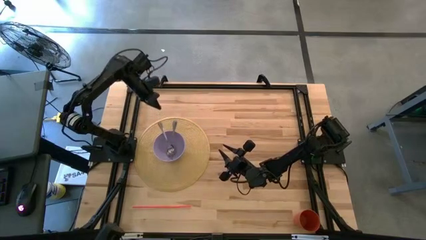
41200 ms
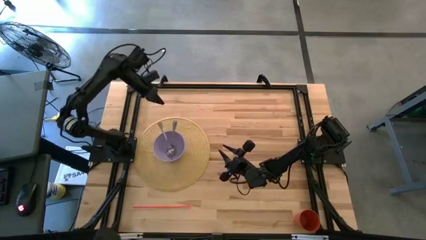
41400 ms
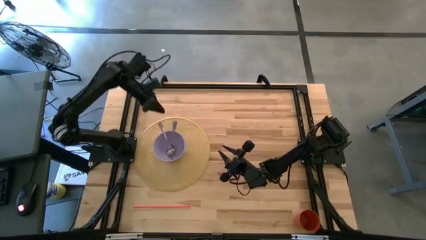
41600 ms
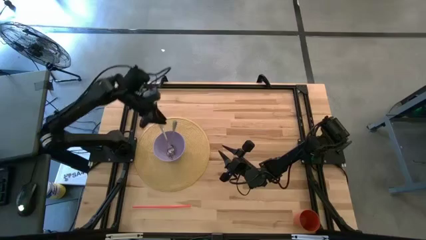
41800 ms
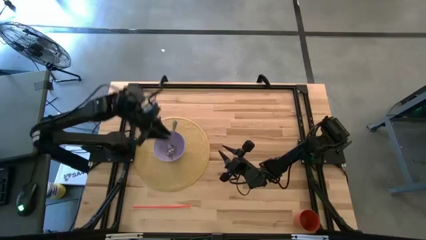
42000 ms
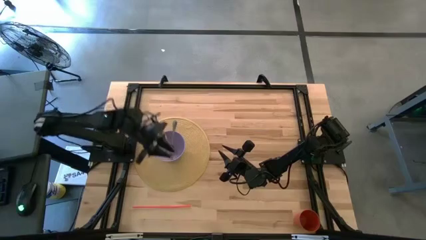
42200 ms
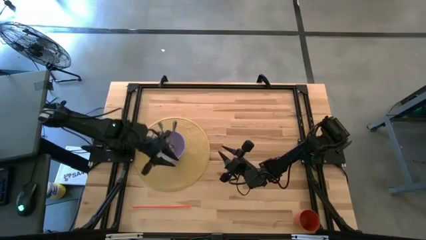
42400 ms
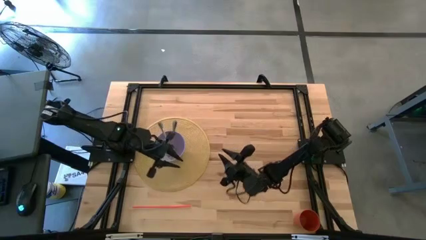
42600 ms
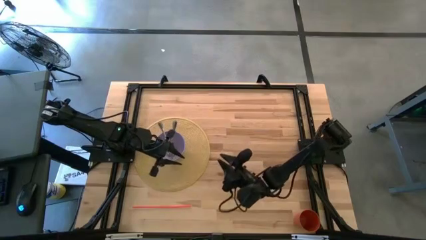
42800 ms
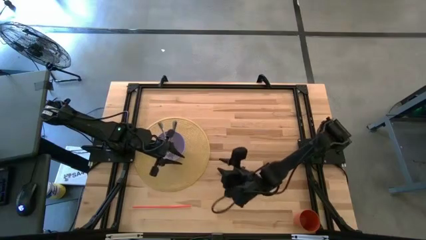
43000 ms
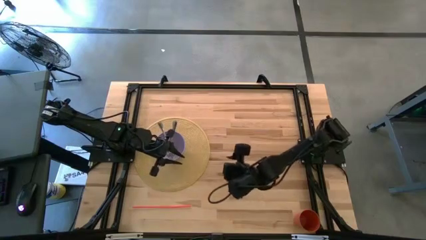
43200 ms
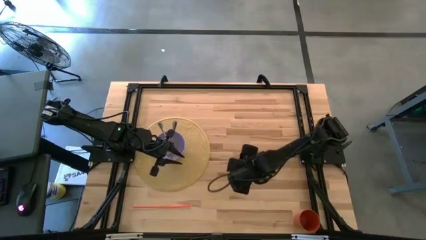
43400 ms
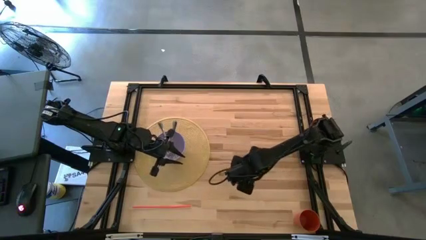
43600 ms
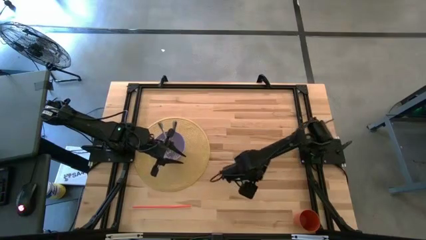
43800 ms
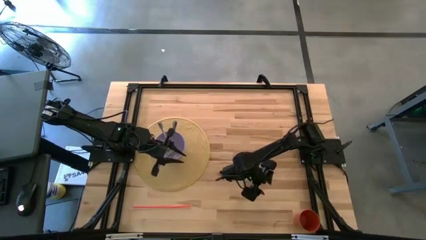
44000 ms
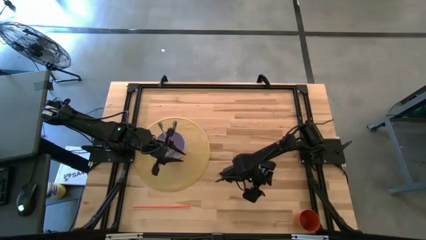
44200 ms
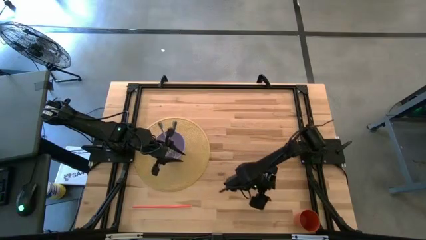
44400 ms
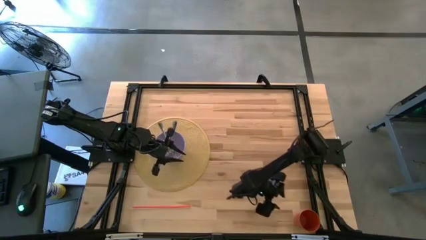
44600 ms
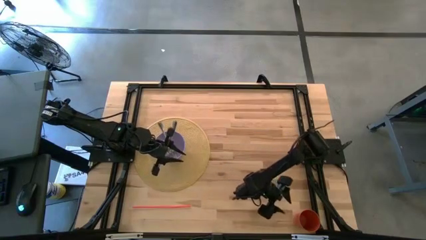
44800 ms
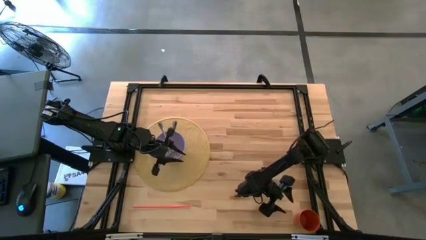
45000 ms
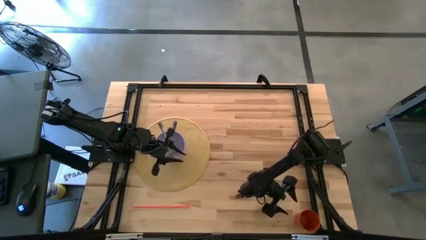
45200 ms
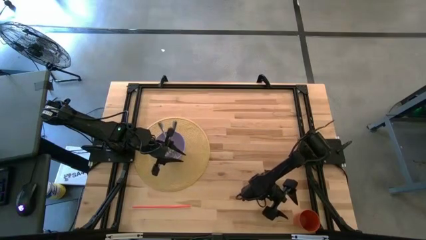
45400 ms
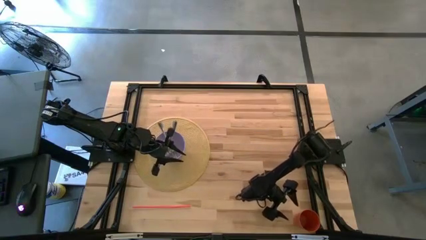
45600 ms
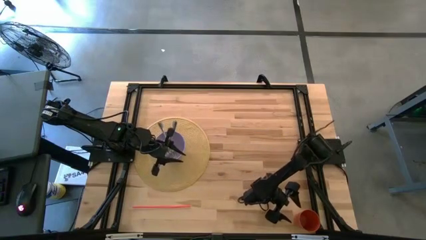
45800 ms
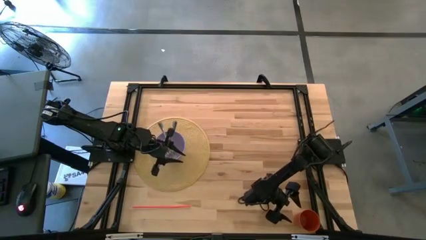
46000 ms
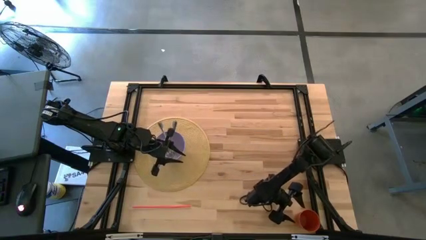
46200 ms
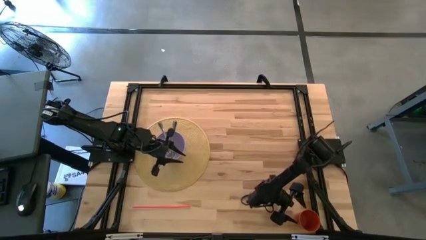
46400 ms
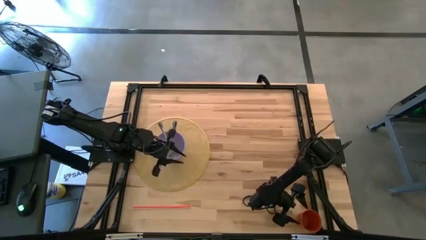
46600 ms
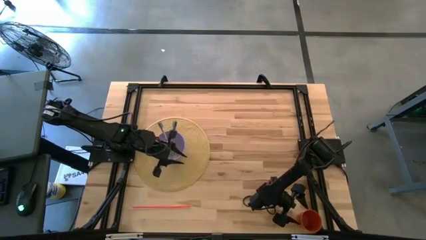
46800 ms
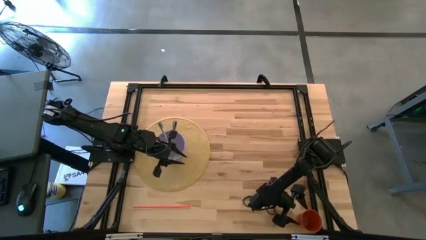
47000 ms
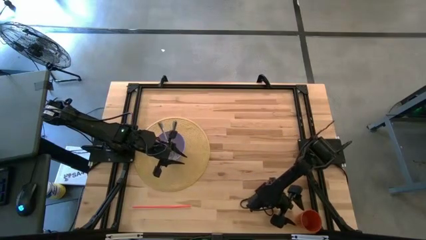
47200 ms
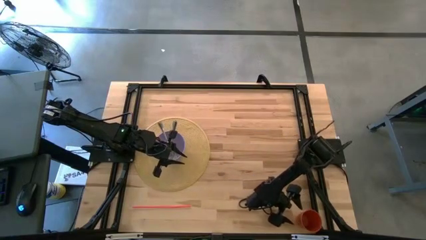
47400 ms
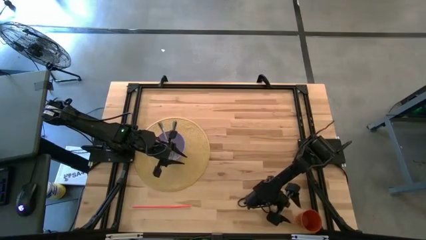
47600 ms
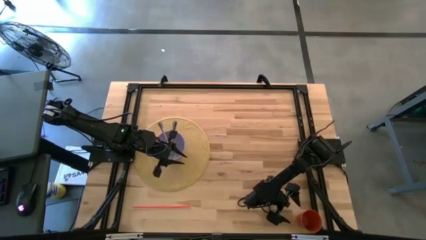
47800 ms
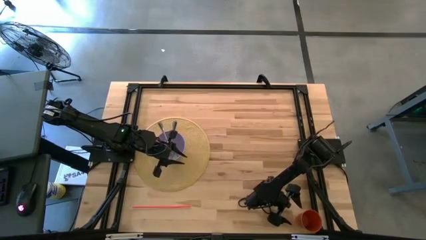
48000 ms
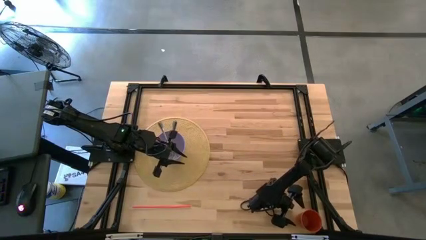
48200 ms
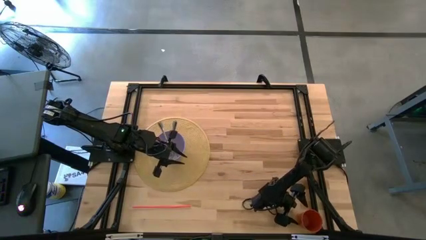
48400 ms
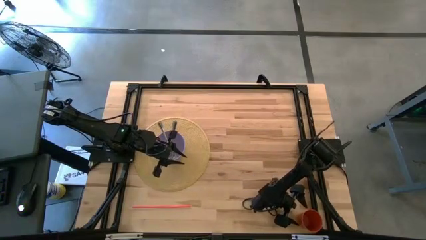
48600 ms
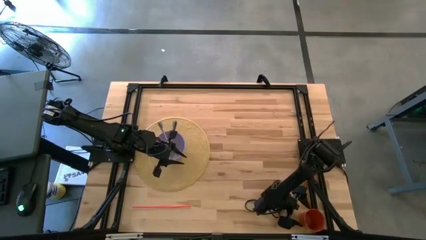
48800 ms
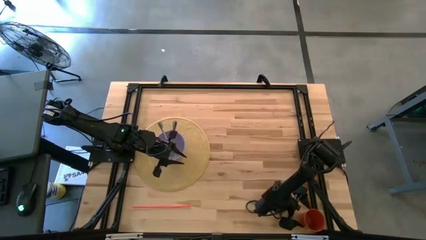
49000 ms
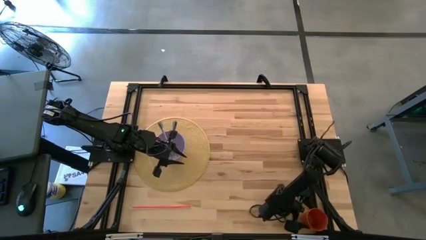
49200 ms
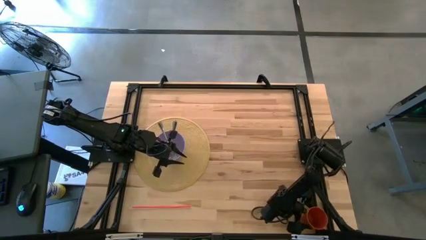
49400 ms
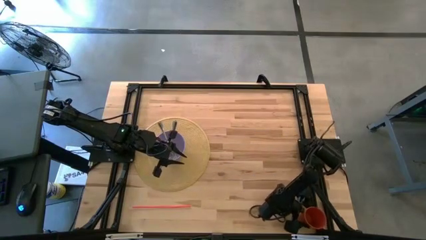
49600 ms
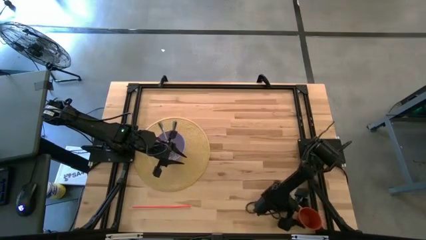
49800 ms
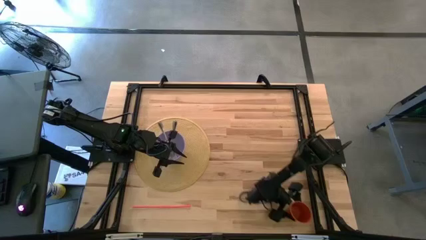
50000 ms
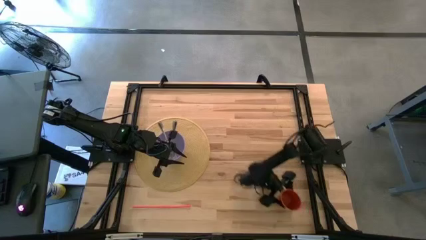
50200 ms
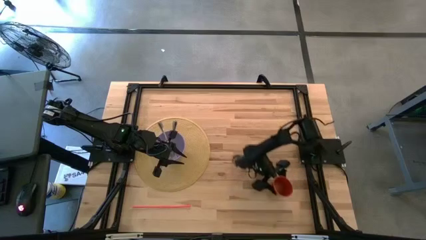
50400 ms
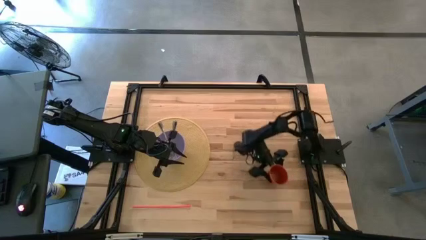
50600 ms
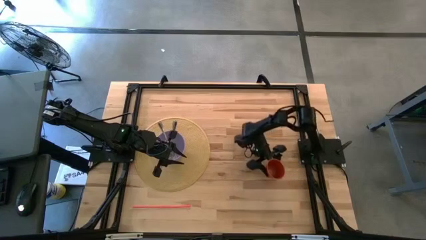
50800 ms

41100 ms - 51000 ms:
Task: Pick & Place Utensil
Put the orange cup on the brown placemat

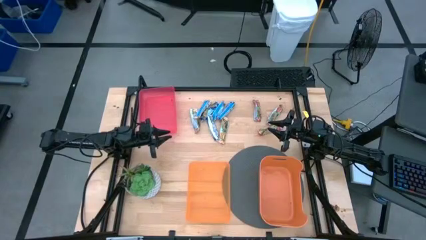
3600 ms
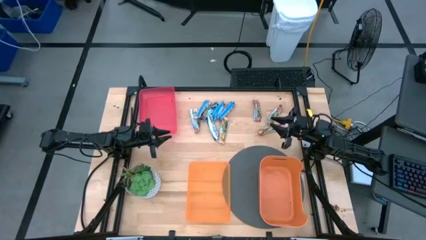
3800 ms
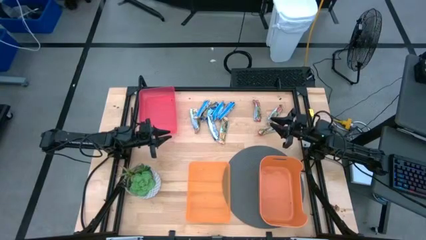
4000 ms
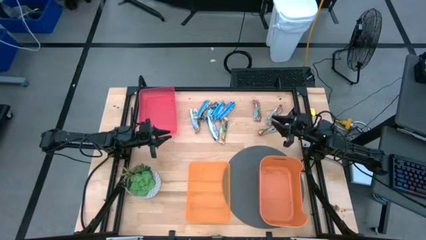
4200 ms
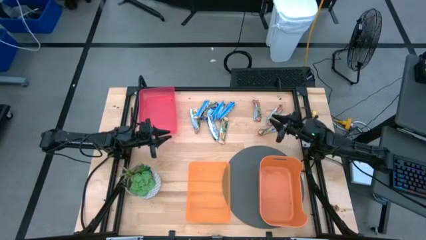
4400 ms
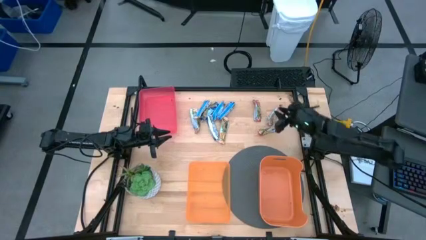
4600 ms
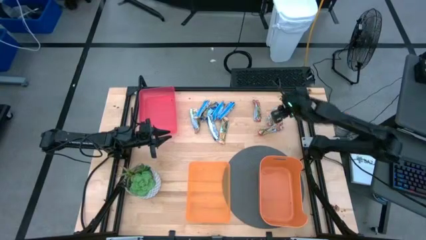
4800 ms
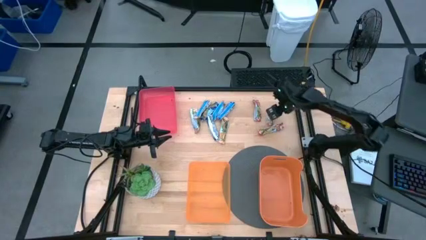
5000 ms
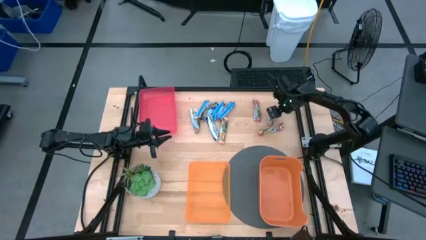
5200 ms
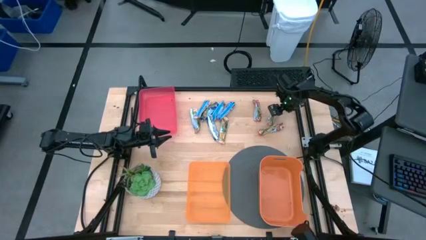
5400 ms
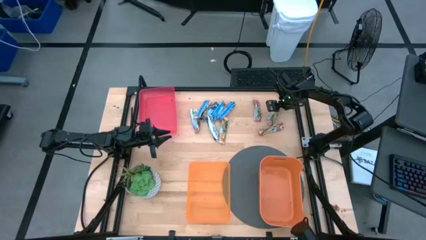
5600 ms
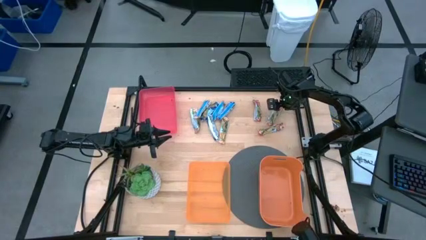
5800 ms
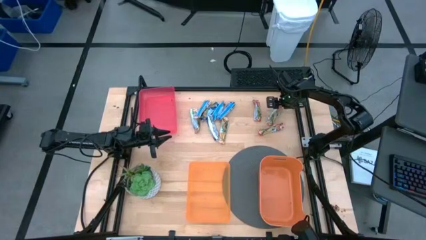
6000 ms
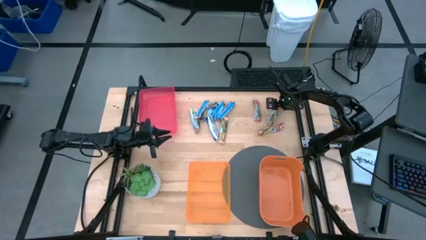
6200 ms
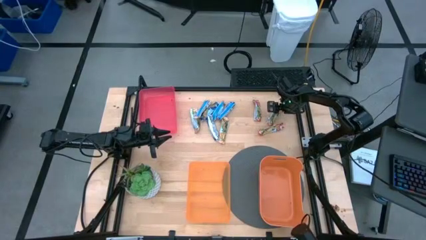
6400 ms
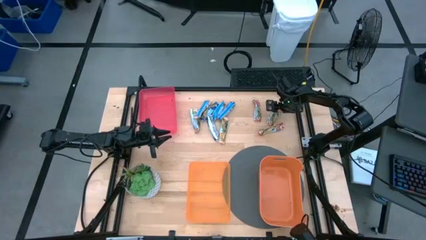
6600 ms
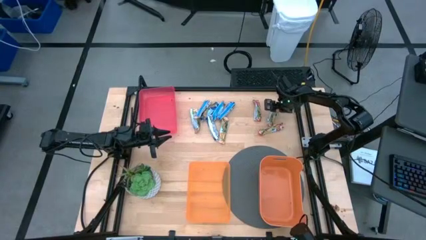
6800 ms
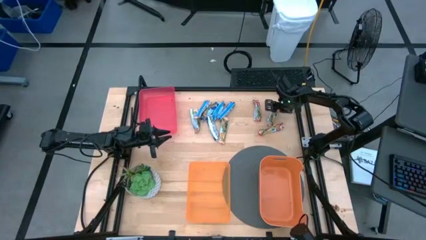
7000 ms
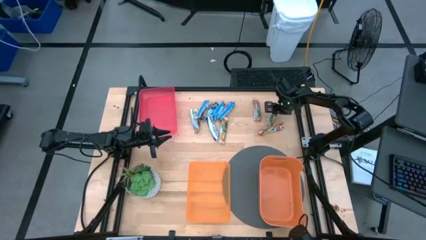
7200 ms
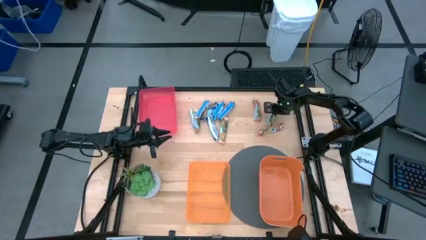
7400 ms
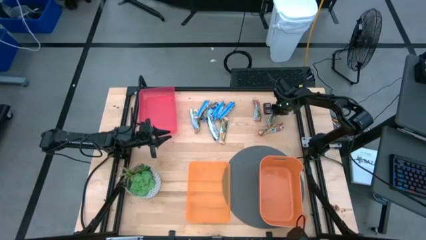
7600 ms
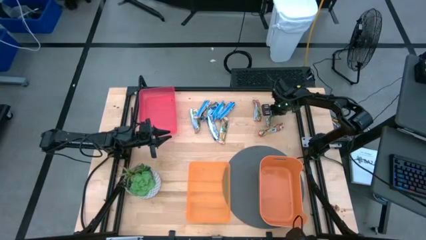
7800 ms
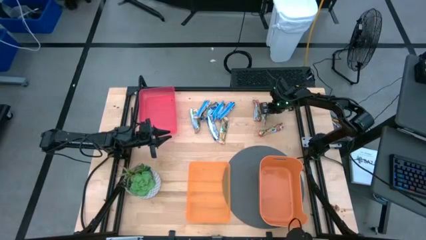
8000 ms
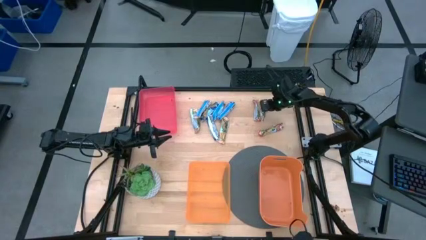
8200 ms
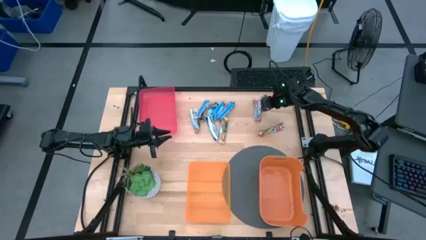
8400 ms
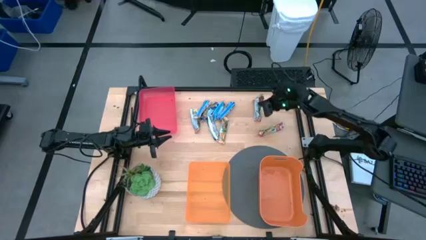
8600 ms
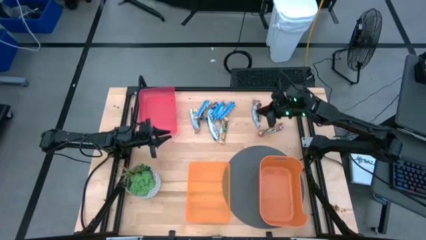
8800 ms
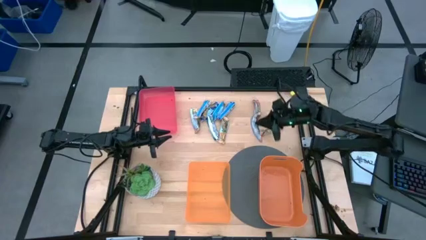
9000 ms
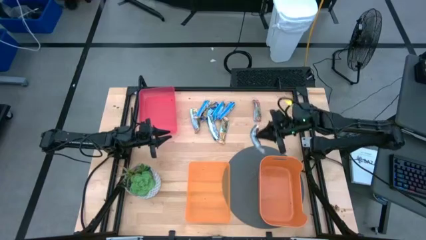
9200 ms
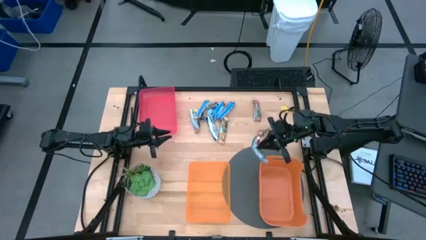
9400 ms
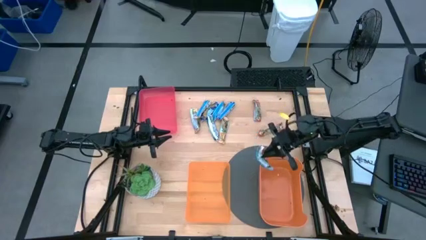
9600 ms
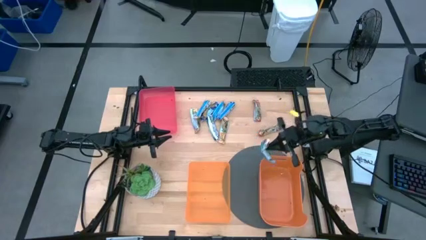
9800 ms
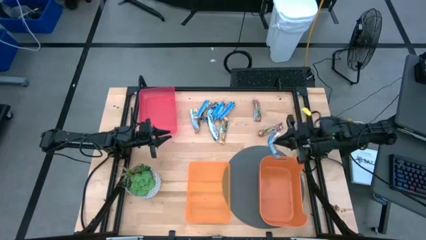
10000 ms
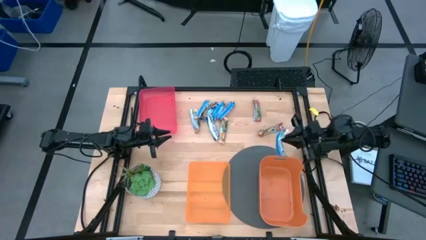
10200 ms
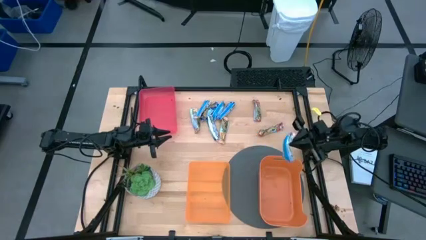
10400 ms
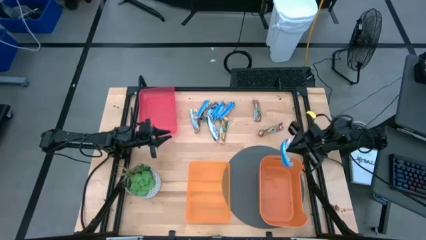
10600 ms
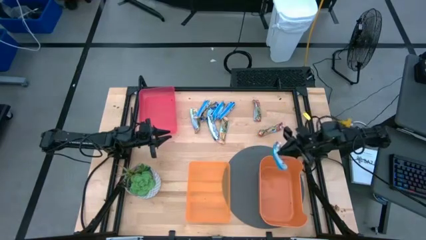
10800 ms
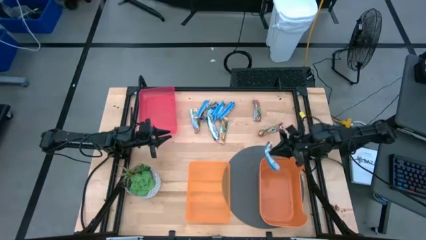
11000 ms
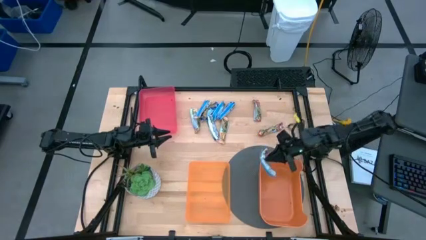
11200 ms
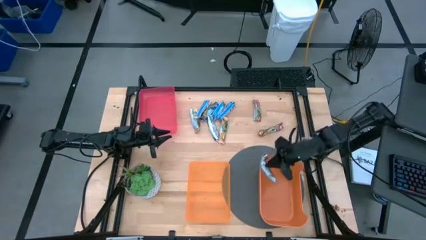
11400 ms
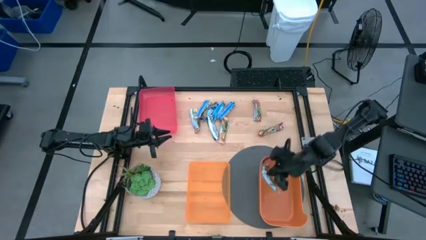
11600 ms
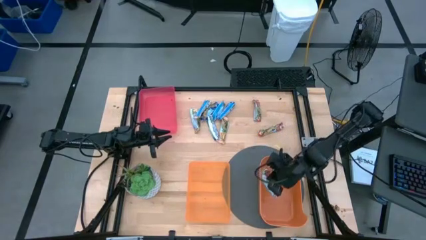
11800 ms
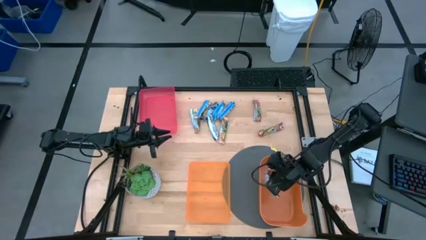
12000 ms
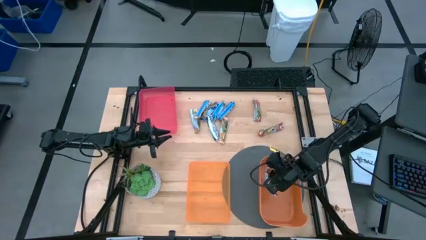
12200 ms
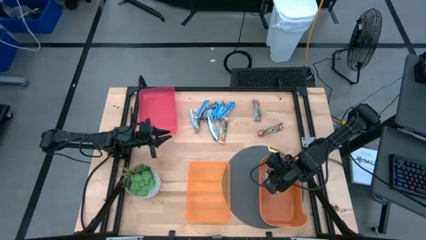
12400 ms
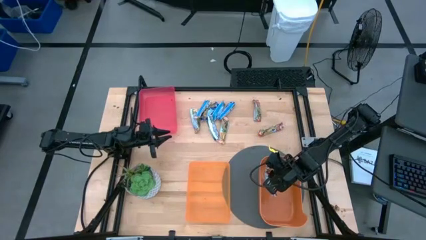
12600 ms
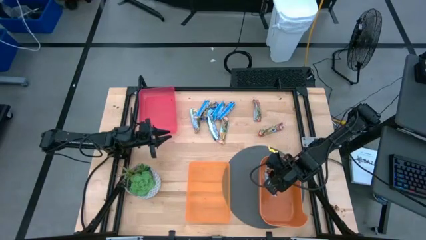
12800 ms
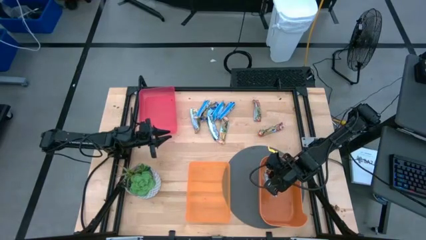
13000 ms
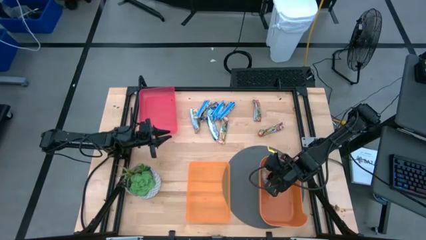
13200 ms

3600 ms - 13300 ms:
Task: Pick and place Granola Bars by type
Put the middle orange granola bar into the right orange bin
